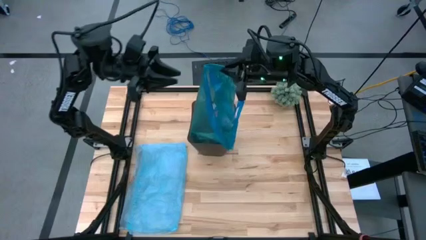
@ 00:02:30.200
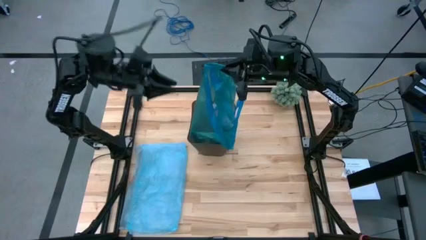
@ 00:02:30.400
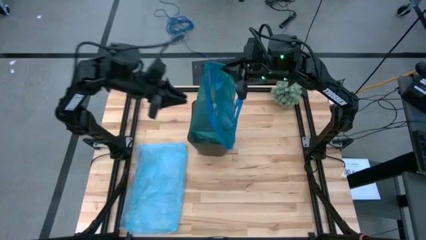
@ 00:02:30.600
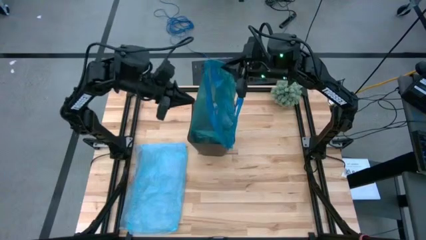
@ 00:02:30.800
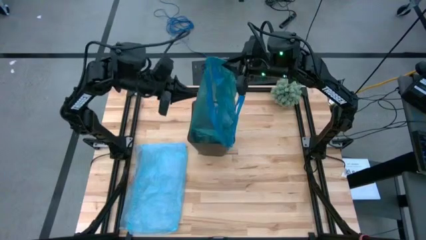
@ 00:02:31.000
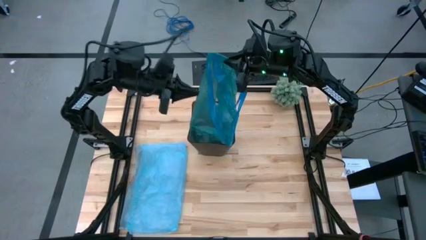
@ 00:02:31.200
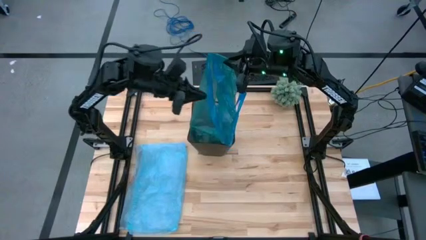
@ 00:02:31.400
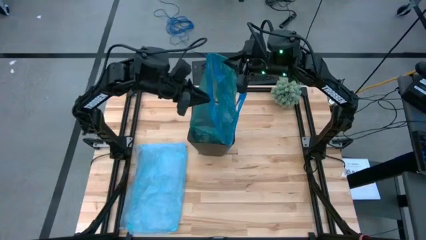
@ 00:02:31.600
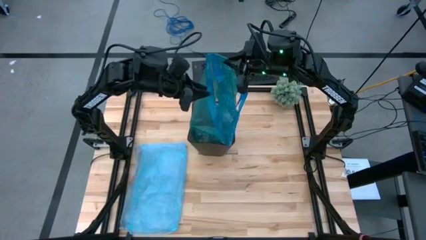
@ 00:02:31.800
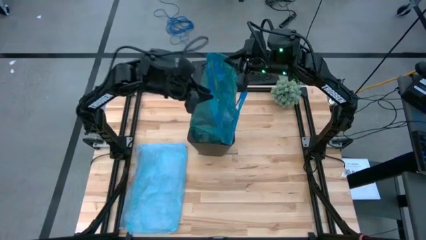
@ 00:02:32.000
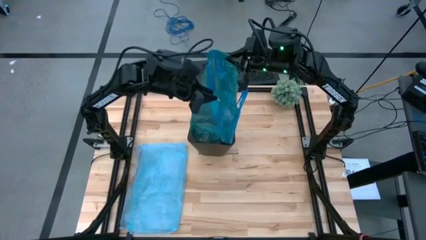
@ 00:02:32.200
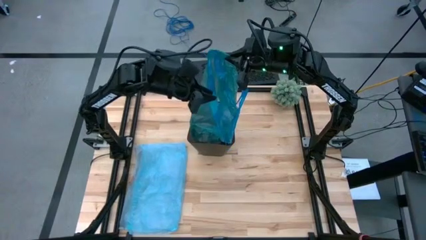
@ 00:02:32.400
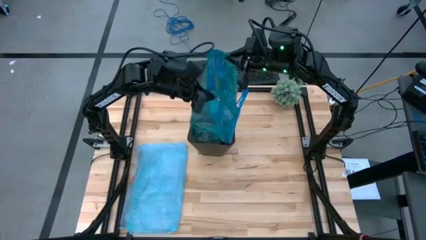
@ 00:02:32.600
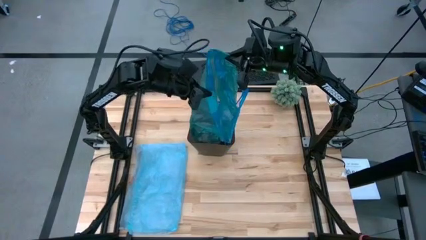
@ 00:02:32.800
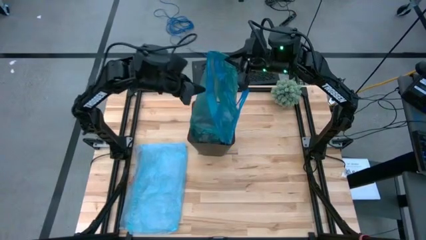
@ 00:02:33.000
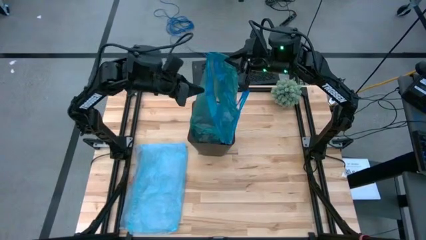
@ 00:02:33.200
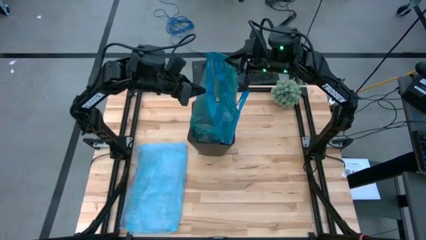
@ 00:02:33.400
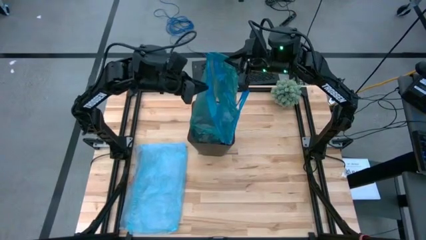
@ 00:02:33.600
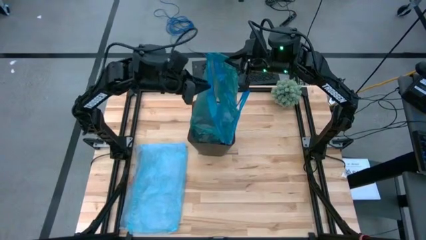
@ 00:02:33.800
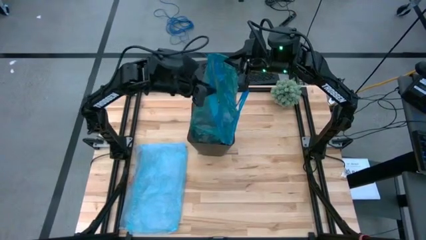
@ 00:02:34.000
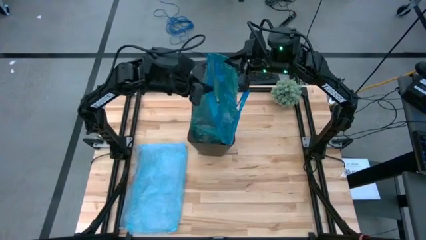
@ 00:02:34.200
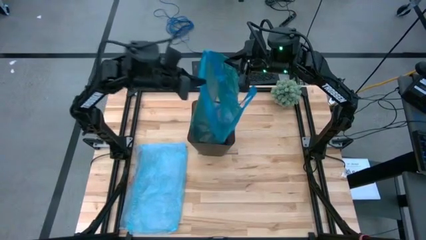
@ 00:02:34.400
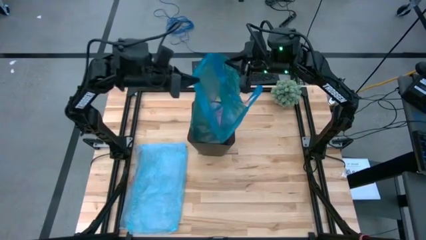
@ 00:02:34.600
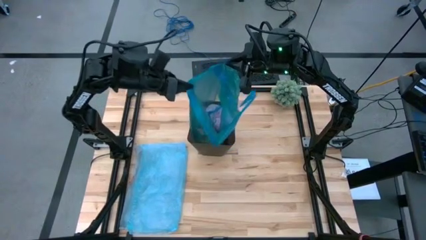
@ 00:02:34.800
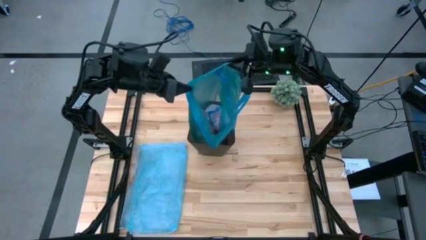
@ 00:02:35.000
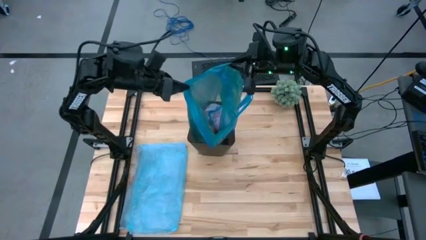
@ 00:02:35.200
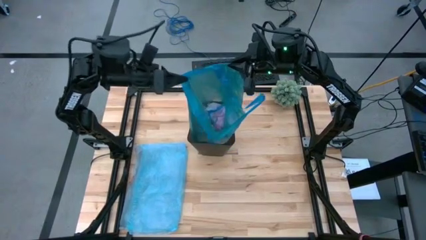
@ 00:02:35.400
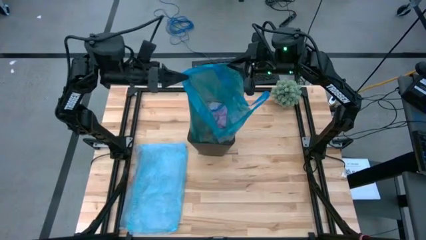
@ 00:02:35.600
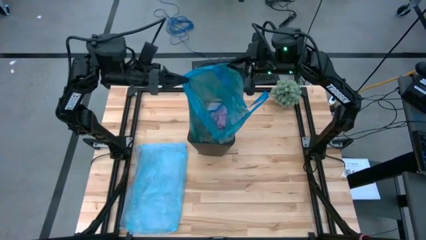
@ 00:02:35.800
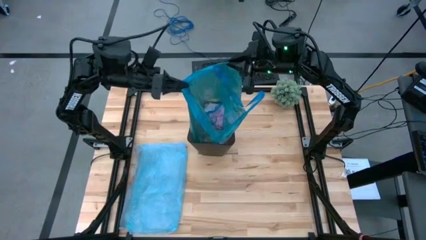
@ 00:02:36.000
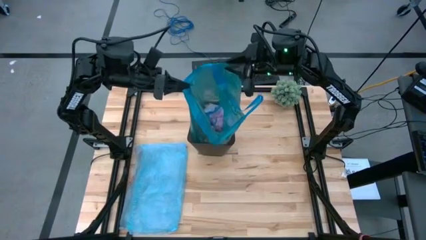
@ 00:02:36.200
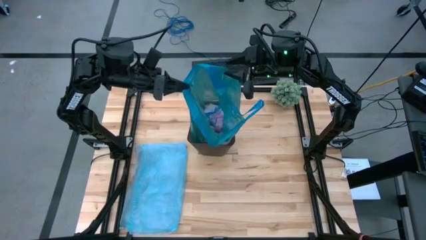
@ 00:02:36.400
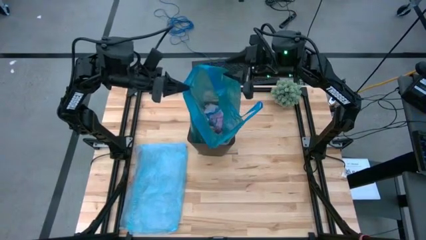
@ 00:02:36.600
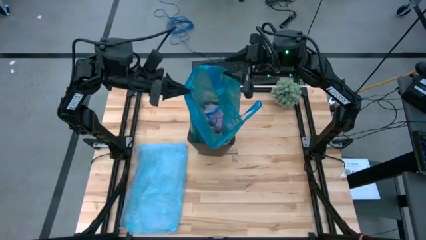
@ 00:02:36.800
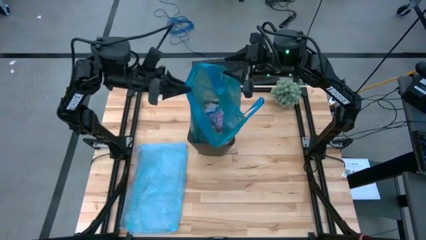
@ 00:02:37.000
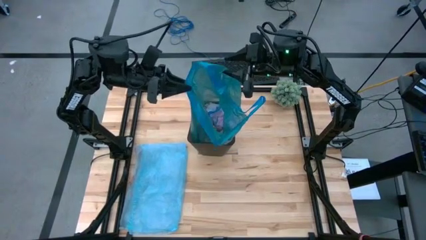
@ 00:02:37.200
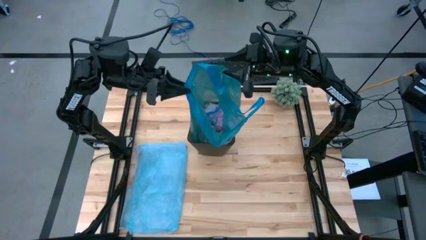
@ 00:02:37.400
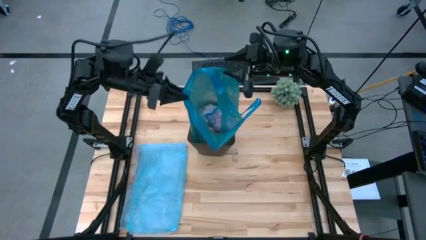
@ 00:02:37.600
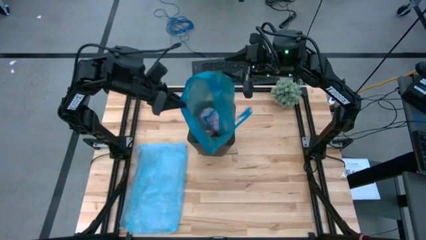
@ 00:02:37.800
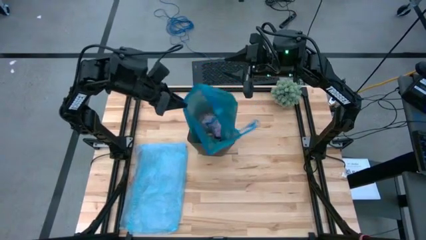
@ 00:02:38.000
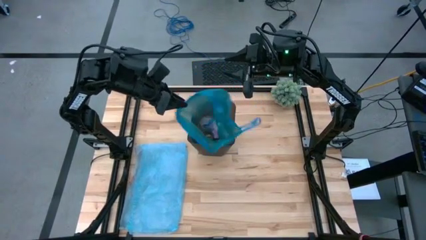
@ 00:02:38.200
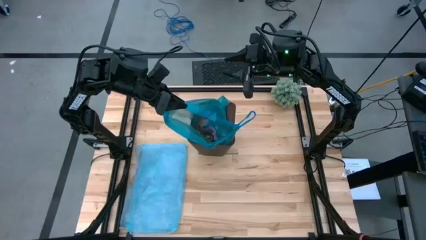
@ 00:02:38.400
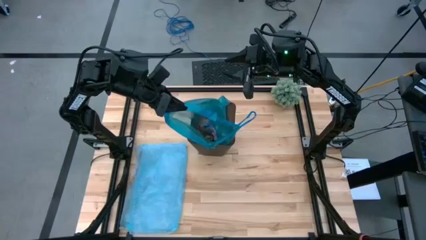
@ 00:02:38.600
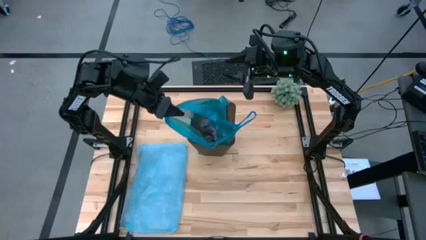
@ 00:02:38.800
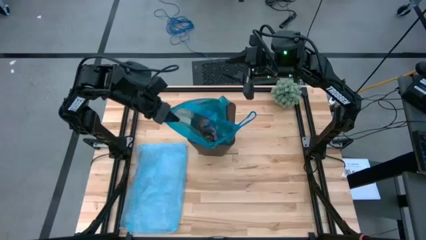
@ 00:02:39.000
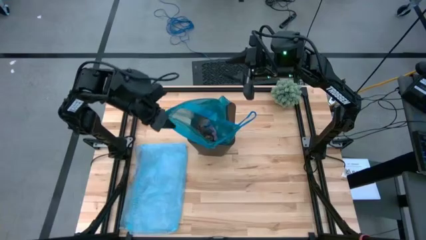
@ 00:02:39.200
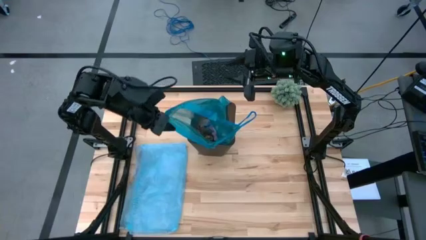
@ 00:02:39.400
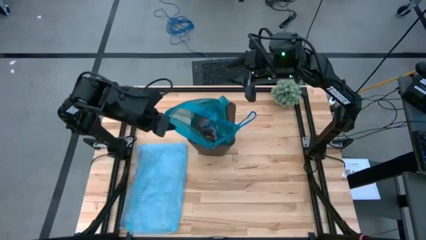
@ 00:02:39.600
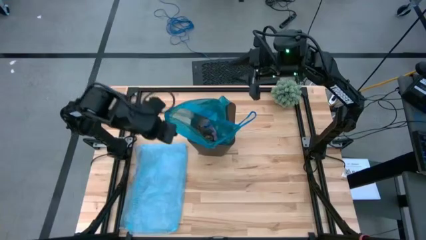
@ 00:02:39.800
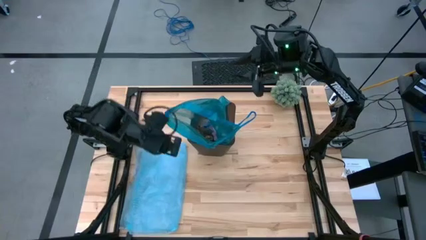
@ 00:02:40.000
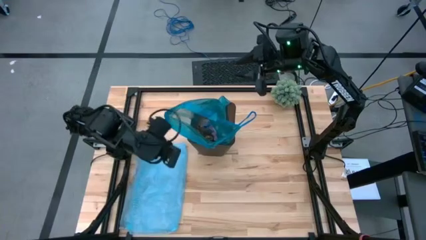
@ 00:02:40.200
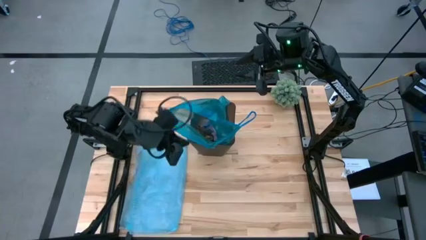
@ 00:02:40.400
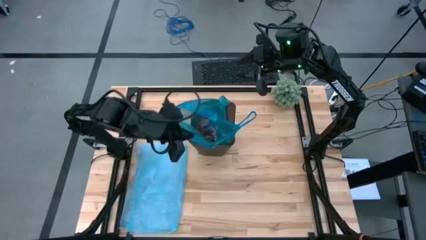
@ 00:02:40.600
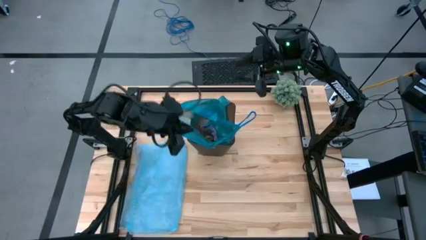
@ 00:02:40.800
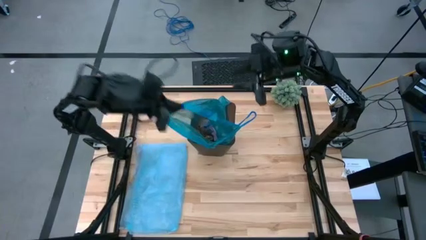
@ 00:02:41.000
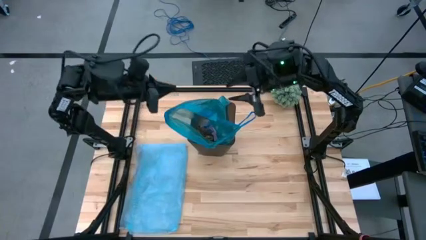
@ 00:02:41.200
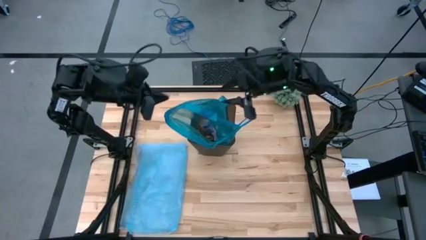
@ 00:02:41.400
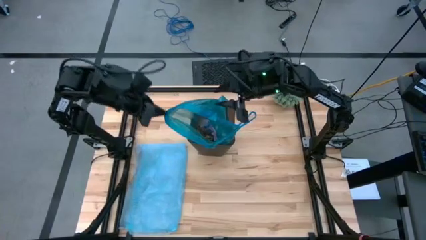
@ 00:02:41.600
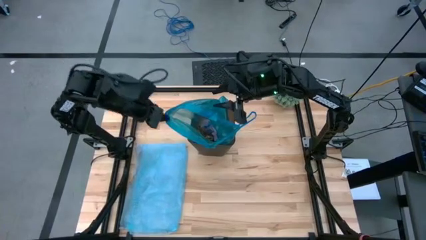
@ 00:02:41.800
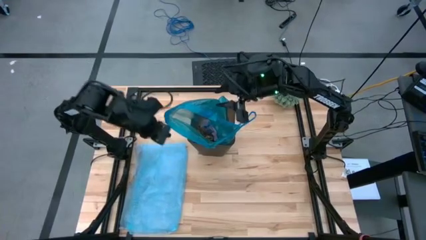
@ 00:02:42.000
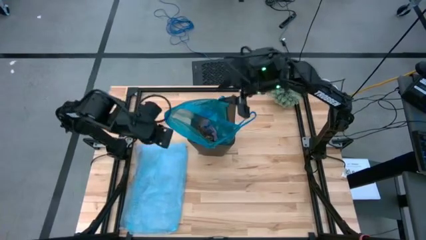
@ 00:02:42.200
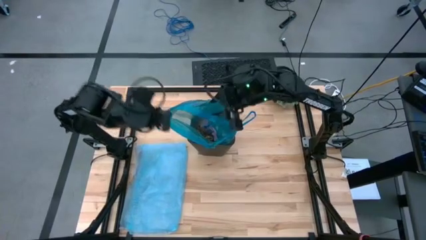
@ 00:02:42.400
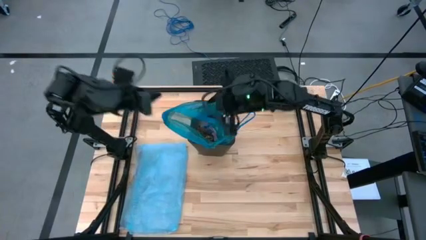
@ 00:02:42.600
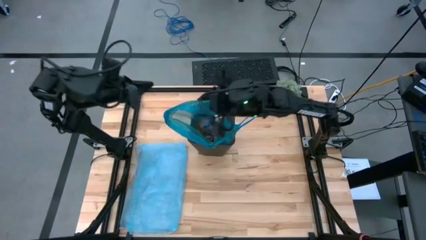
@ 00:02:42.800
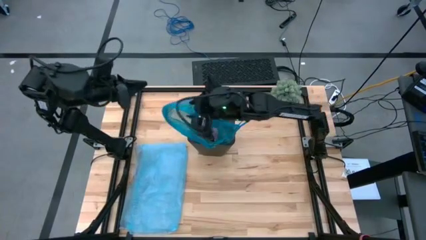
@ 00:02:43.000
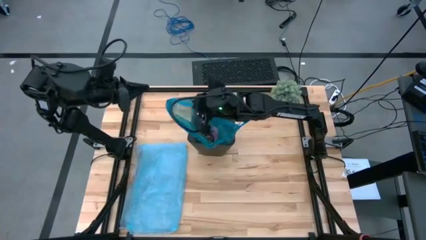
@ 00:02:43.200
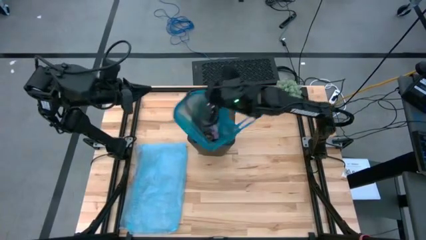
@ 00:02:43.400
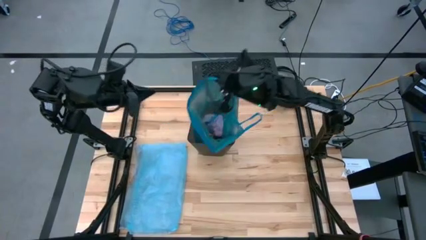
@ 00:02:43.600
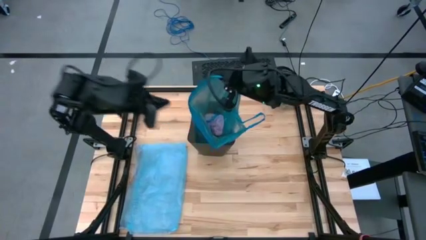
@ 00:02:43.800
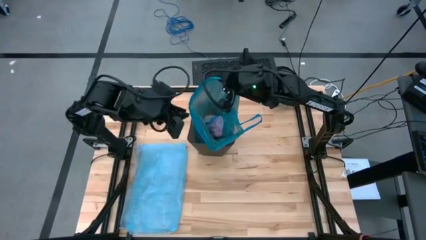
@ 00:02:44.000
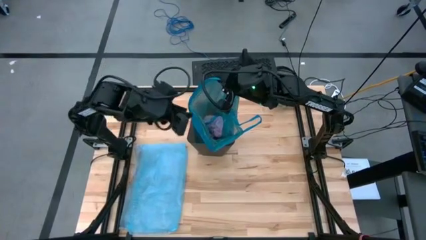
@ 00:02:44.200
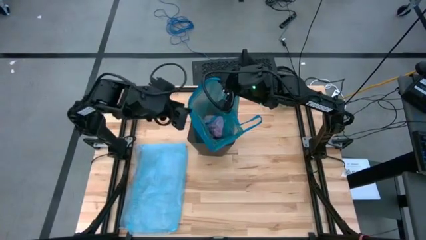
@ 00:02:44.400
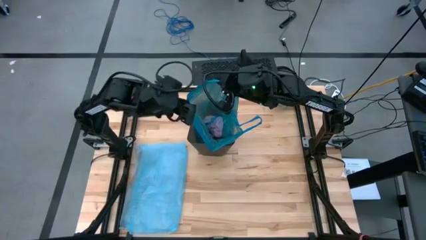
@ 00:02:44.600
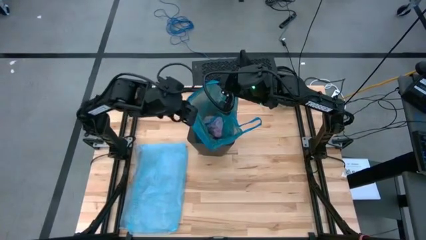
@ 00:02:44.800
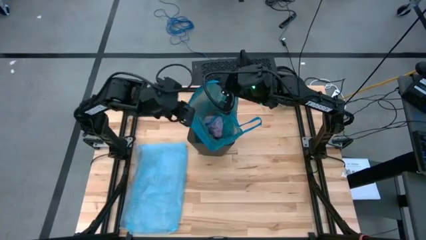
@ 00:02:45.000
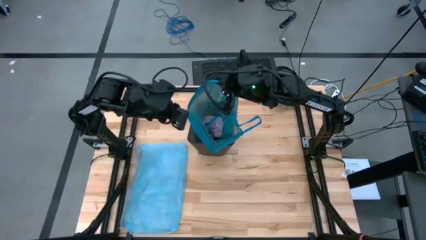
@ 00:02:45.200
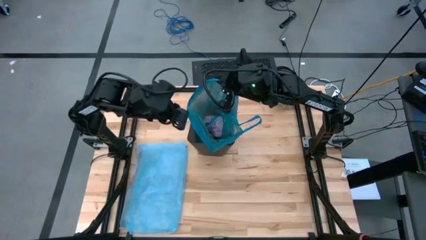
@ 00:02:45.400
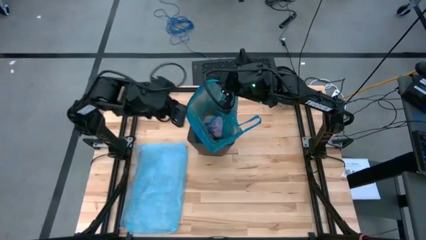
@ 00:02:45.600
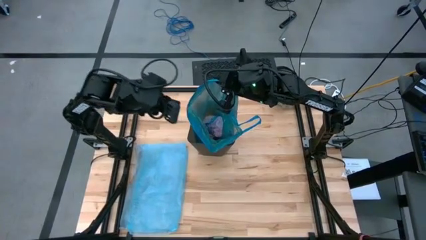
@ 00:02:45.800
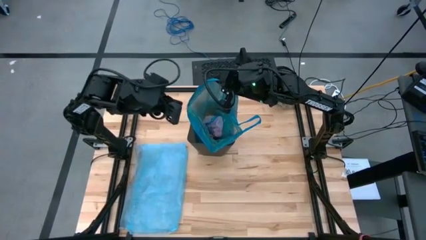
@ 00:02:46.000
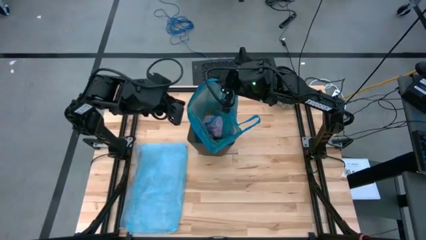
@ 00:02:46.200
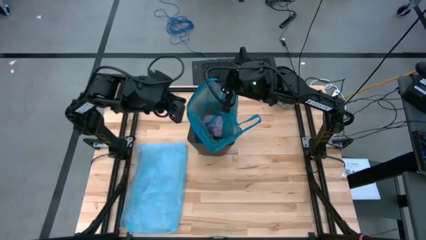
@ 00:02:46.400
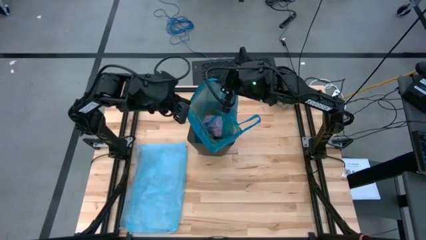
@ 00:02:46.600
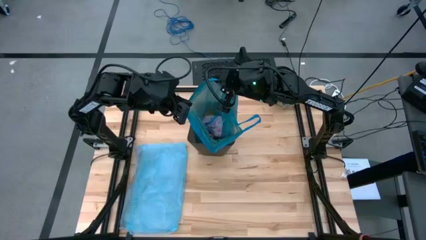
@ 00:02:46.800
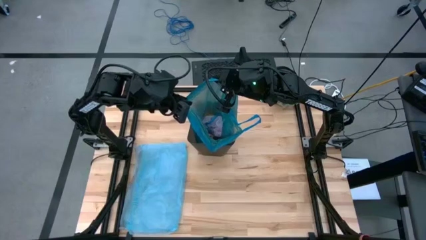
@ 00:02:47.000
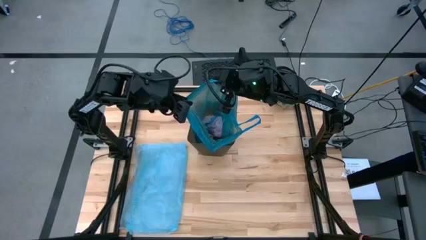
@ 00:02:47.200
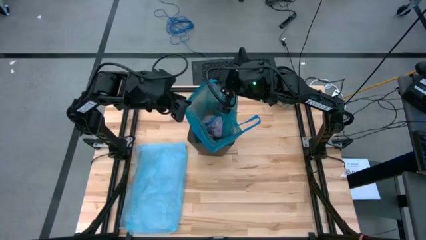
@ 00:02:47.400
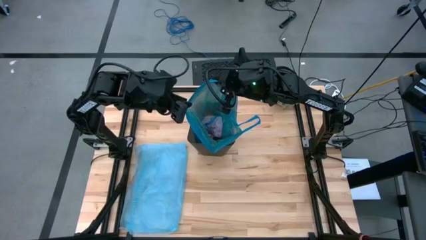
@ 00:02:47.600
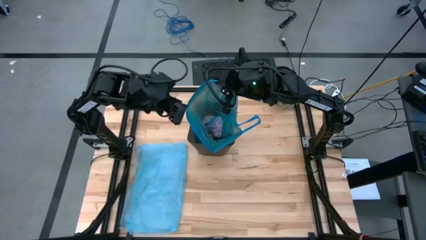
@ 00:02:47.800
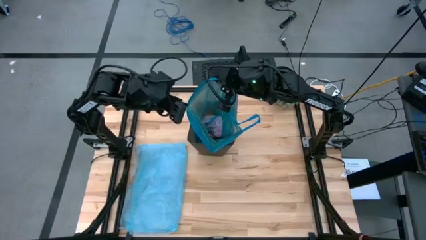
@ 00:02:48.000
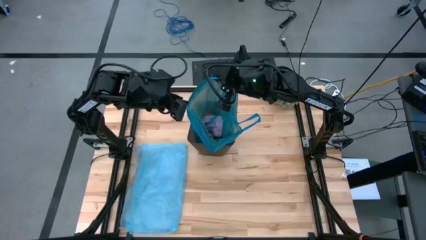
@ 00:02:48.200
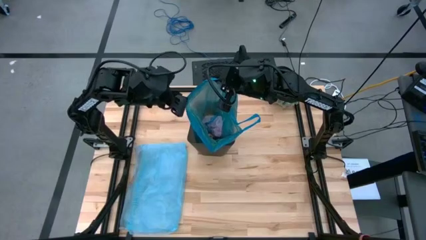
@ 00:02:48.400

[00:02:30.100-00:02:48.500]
Task: place trash/remove bag and relplace
Remove the trash bag from the trash bin
